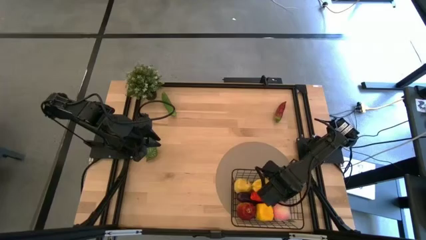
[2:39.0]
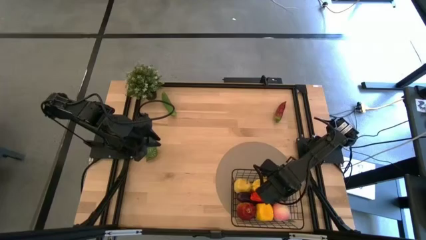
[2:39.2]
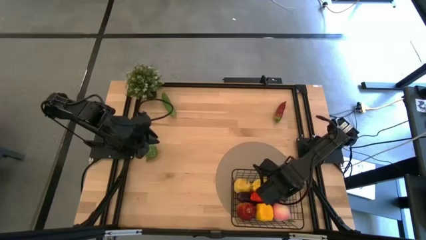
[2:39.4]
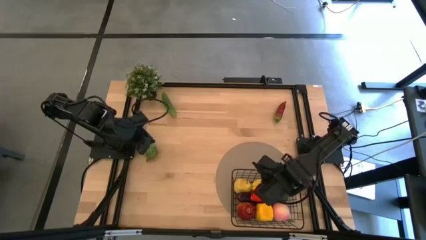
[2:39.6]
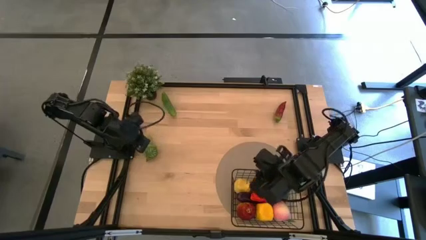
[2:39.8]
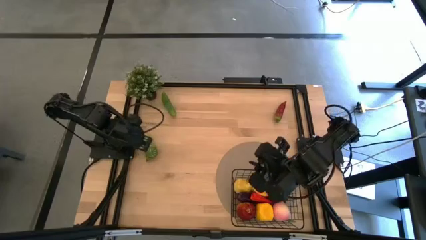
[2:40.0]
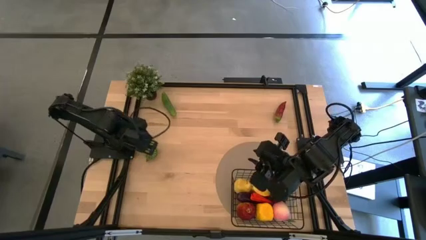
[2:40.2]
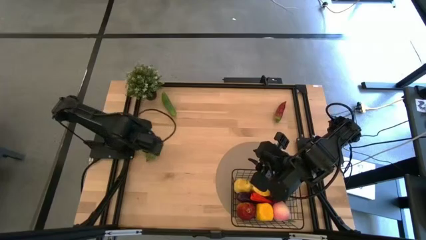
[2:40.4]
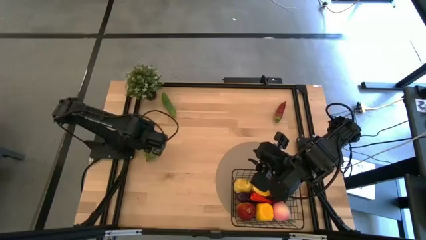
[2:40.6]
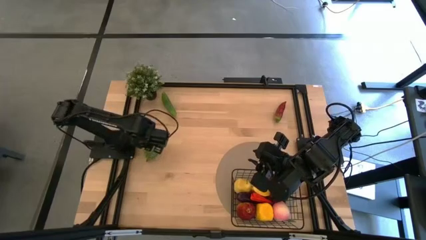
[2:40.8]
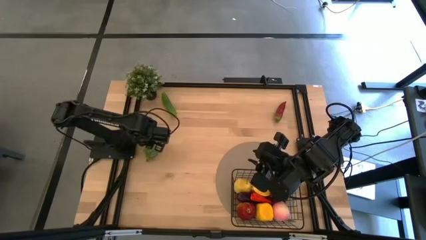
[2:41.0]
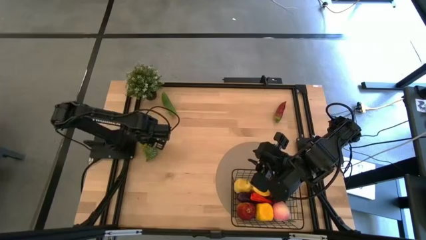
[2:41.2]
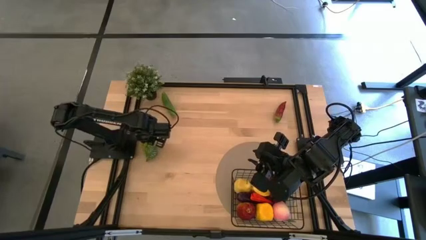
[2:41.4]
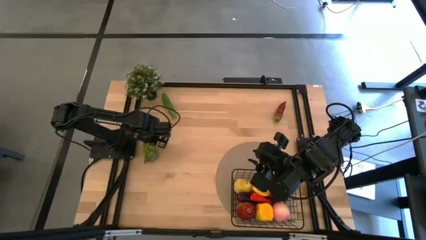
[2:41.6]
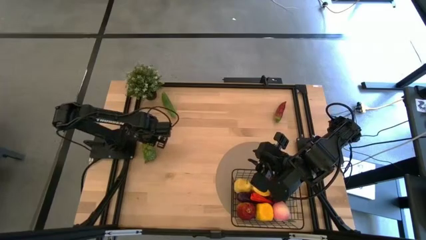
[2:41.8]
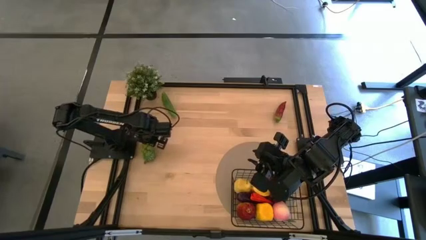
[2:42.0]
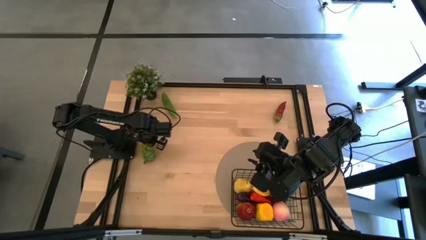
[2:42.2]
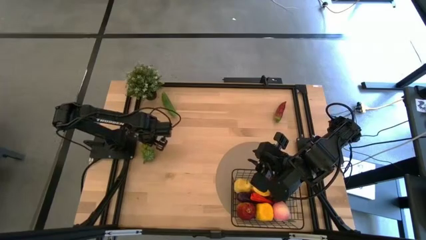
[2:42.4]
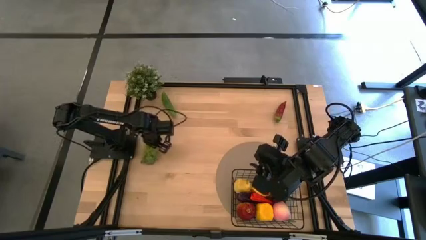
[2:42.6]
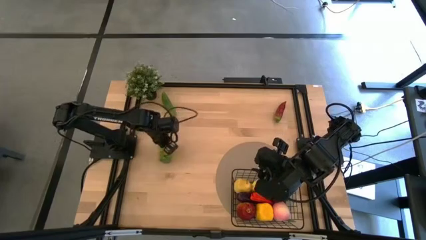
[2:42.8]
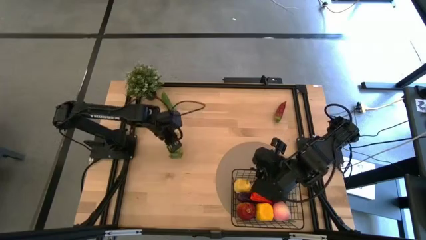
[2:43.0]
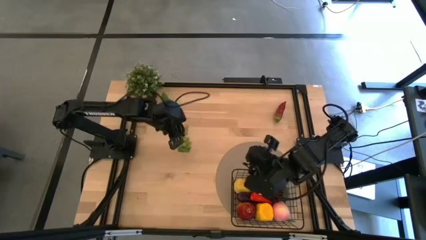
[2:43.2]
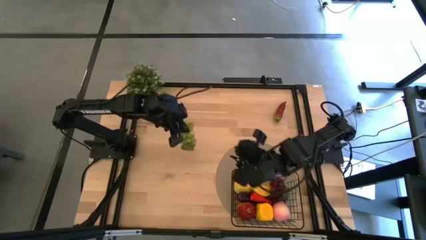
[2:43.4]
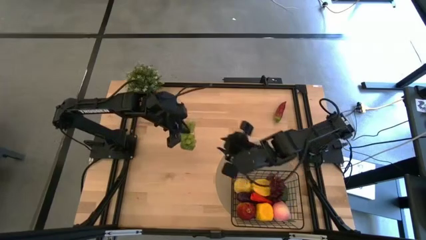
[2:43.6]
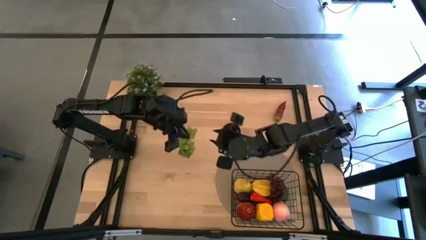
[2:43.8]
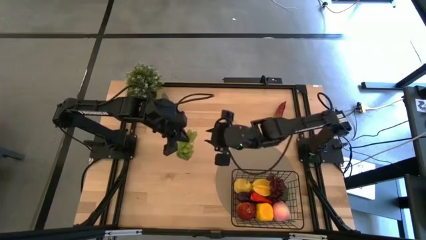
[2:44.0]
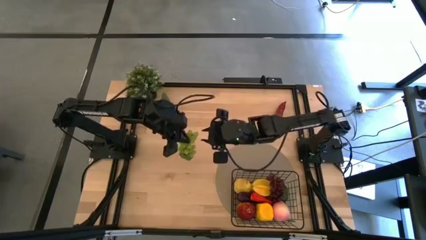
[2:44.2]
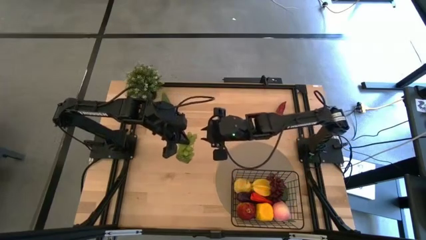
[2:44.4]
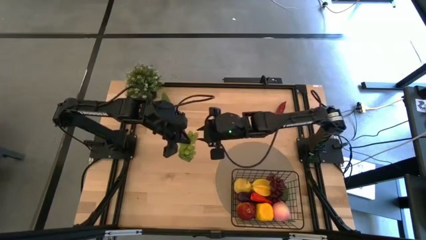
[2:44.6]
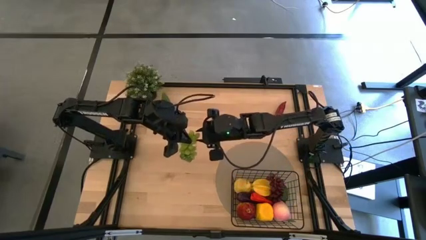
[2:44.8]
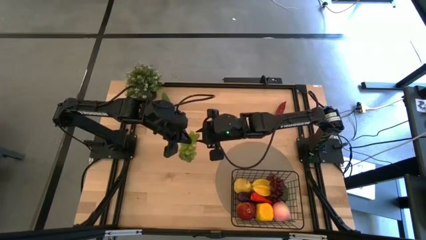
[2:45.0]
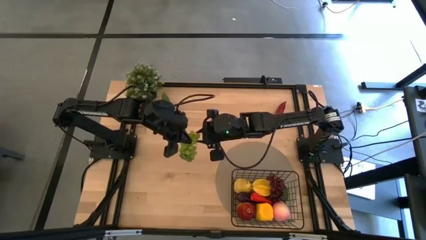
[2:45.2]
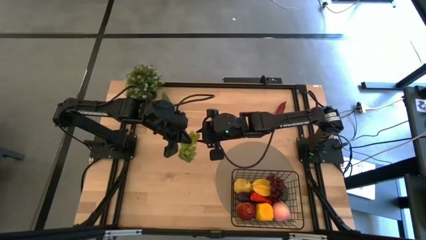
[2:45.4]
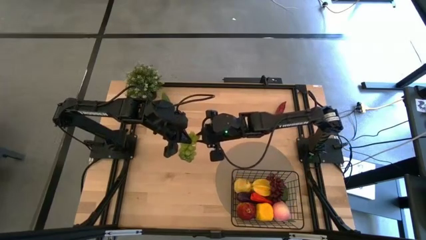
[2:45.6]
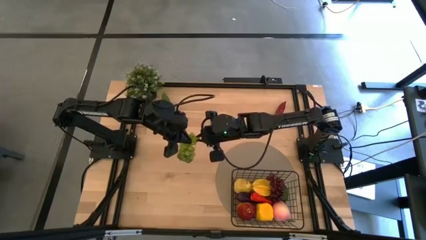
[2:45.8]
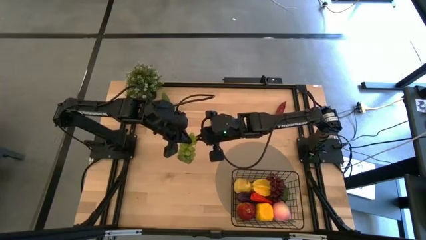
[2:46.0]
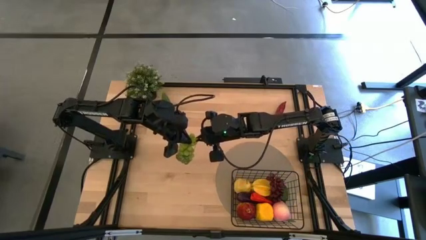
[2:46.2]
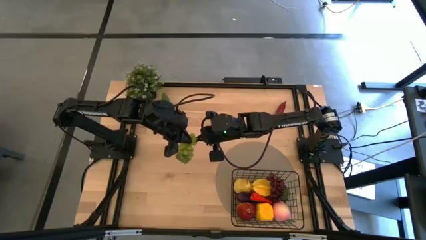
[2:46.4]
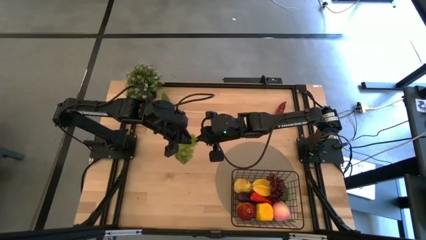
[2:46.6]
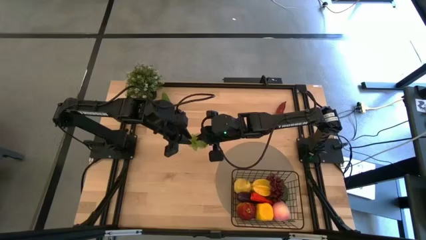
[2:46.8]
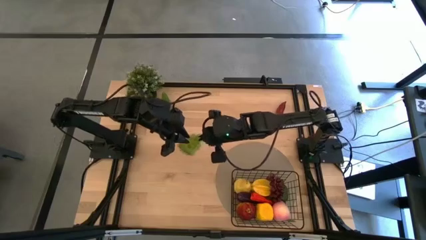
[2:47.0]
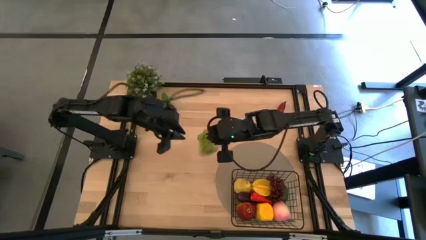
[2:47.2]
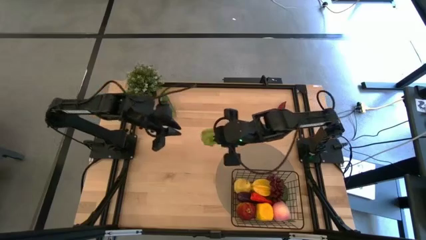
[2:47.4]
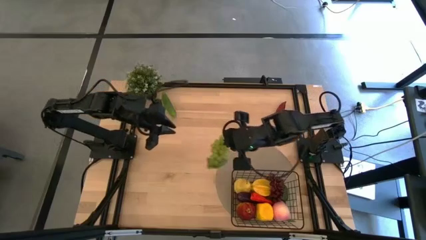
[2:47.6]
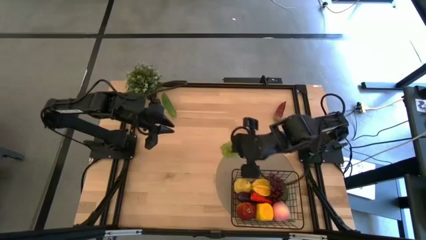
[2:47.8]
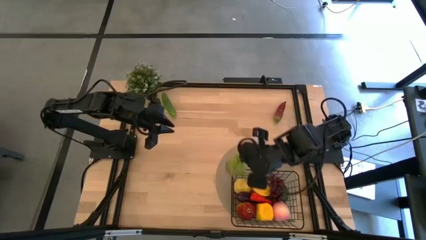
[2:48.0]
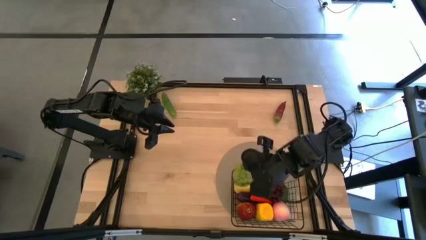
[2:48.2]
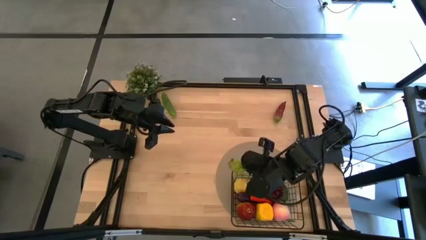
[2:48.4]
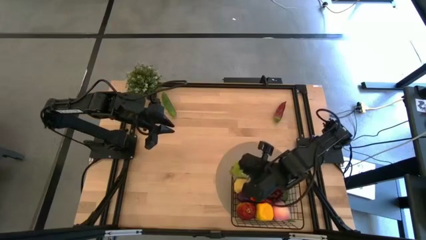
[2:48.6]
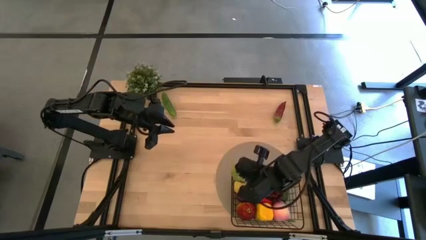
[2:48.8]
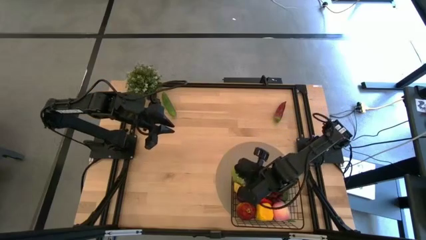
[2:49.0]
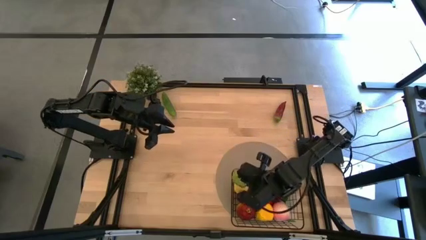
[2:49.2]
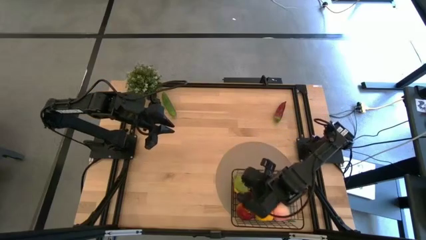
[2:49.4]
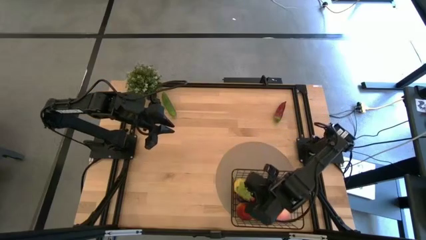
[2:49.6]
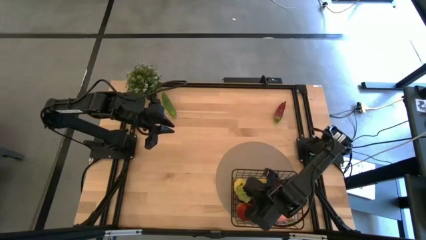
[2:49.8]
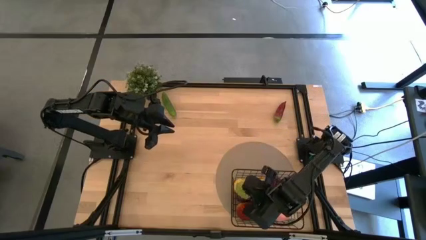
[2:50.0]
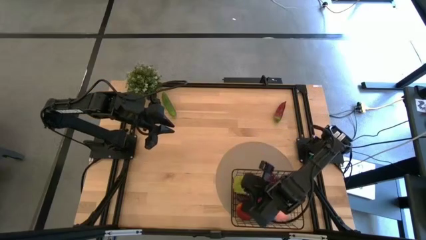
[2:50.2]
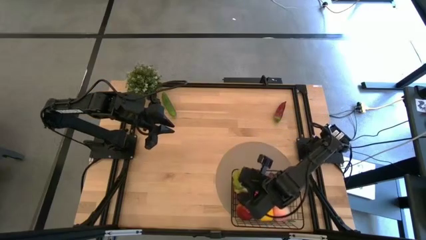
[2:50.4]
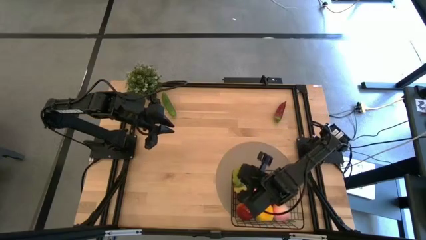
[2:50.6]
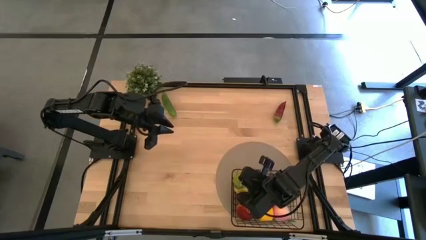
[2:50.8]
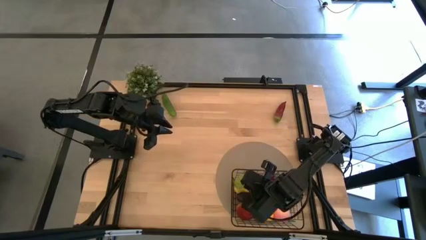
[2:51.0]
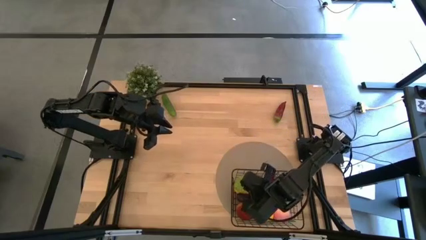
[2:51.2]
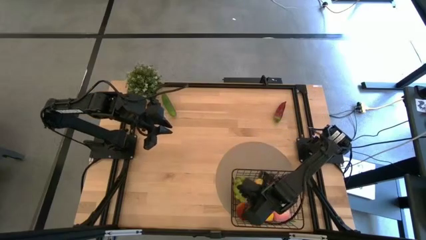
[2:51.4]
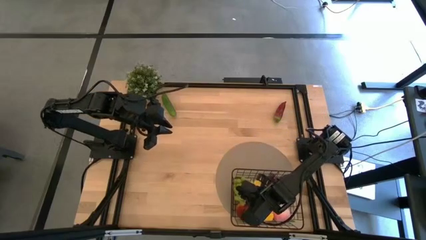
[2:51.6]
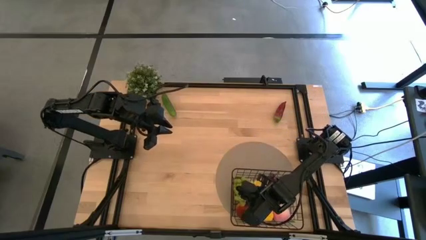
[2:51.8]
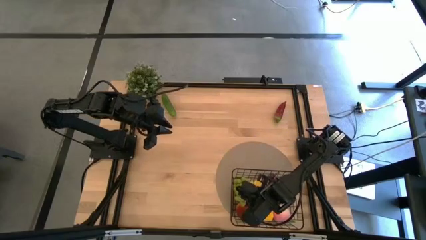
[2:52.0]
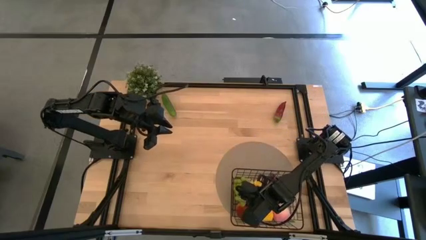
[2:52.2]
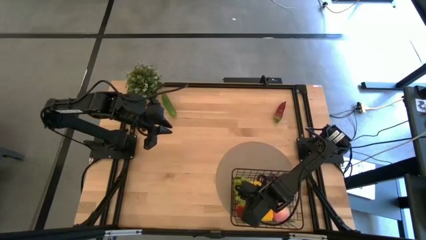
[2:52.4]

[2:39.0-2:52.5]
Task: Build produce basket
Put the green grapes into the wire basket

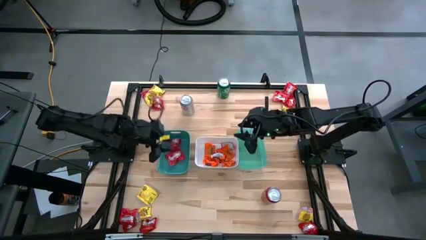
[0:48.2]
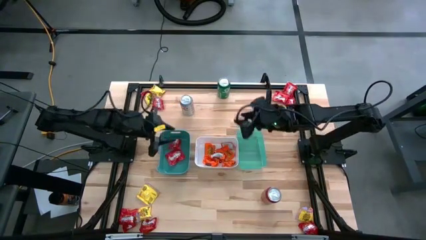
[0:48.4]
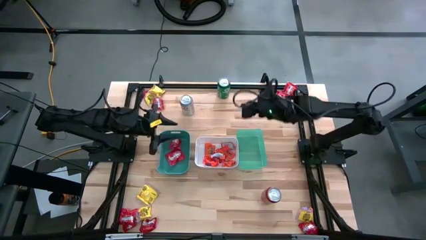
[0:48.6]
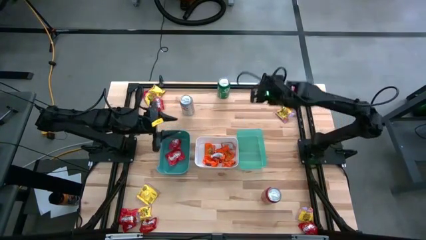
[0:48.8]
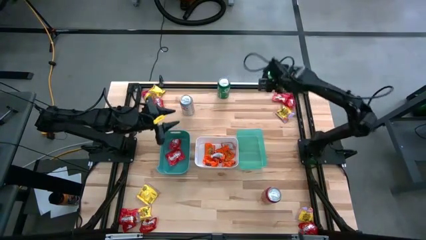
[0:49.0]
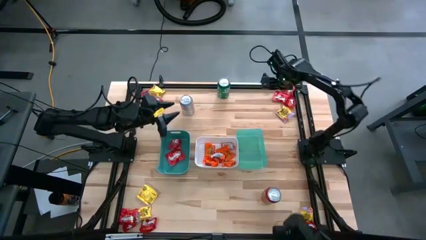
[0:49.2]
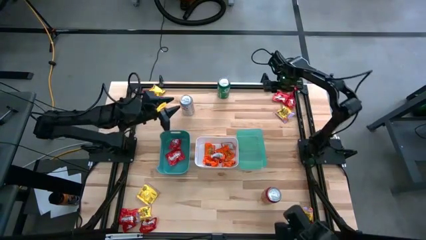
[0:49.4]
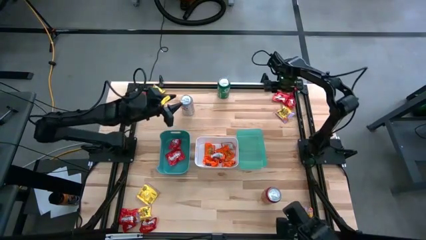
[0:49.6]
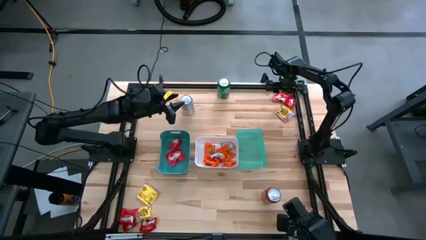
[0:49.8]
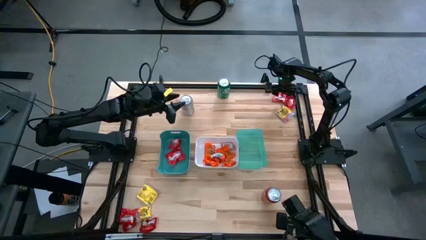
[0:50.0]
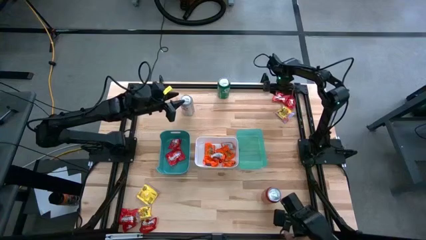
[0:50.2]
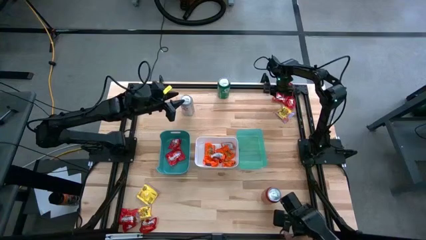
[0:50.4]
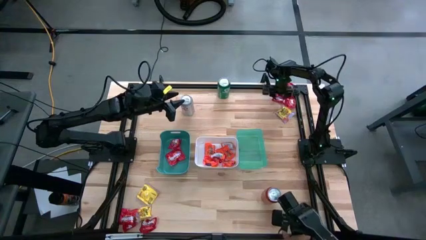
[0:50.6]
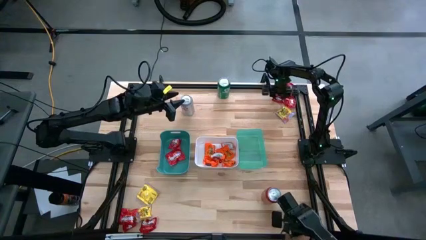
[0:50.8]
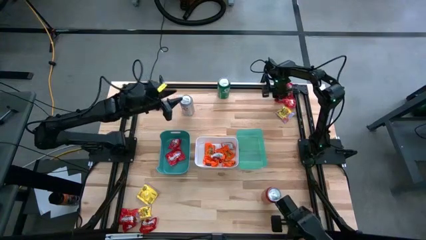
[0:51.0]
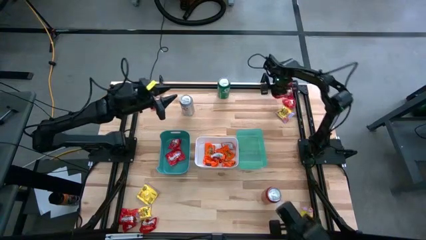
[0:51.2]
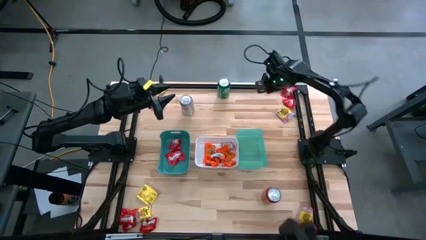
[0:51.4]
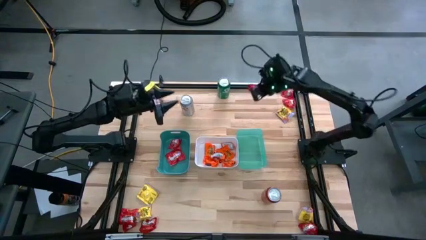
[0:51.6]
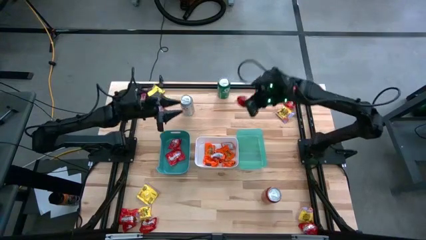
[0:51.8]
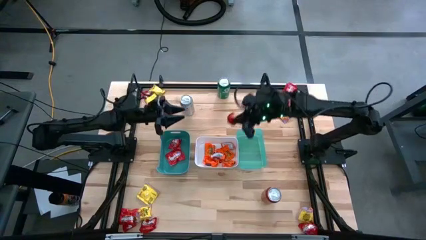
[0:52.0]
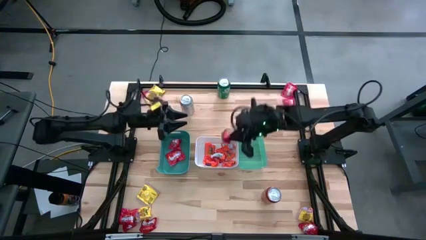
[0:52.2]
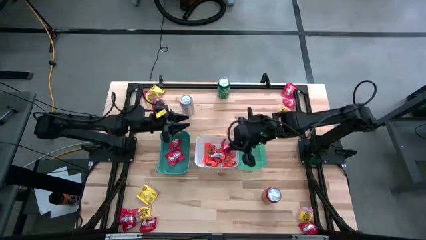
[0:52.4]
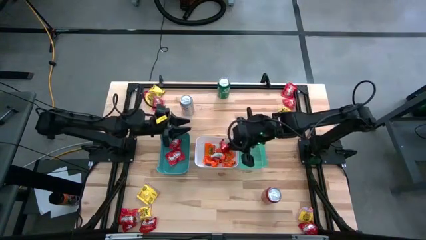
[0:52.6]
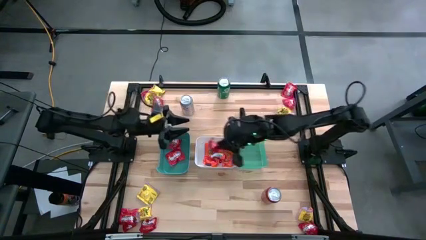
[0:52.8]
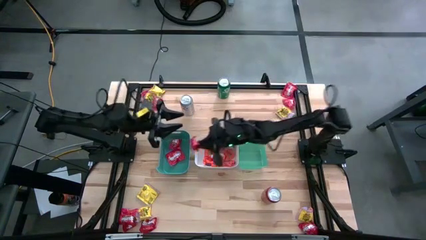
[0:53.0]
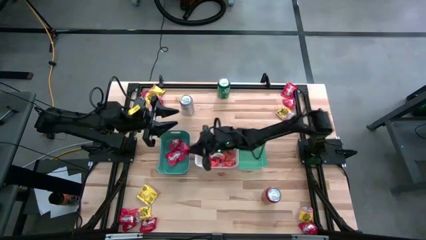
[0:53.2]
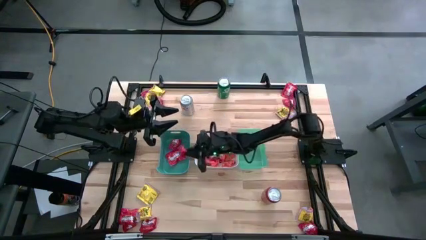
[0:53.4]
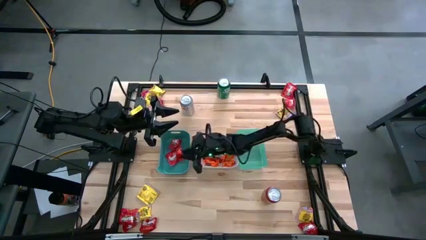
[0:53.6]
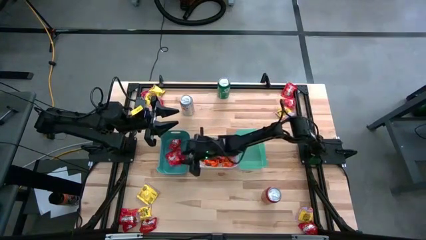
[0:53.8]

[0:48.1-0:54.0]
Task: Sort candy
Put the red candy into the green bin
